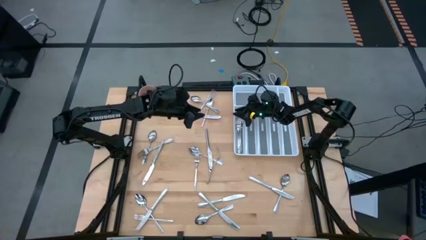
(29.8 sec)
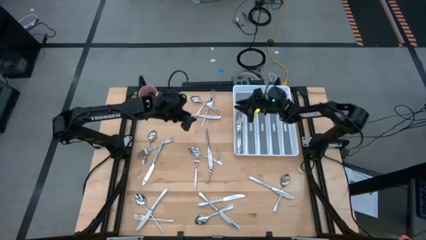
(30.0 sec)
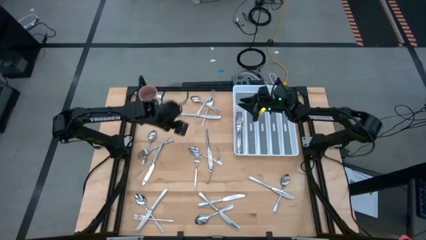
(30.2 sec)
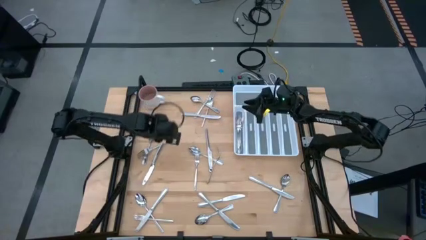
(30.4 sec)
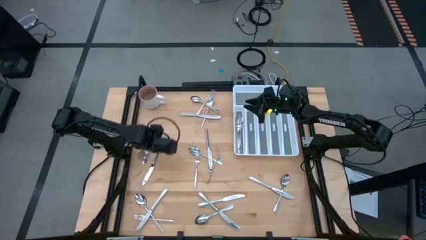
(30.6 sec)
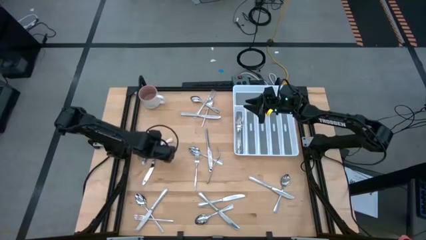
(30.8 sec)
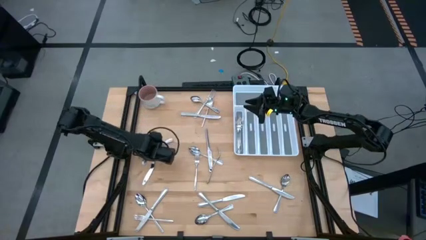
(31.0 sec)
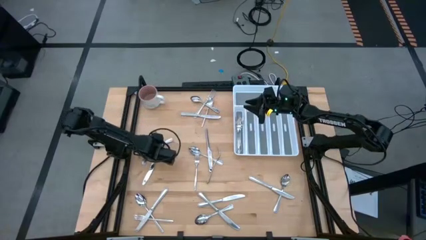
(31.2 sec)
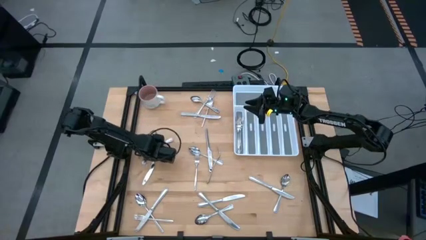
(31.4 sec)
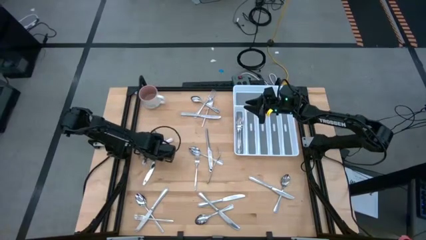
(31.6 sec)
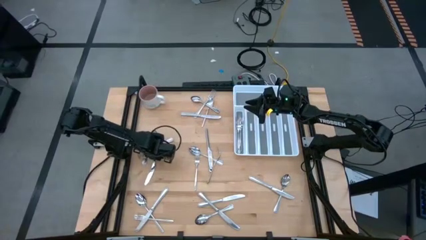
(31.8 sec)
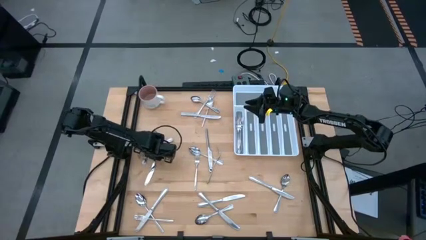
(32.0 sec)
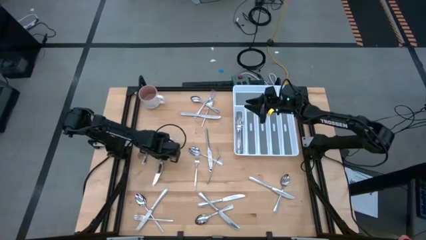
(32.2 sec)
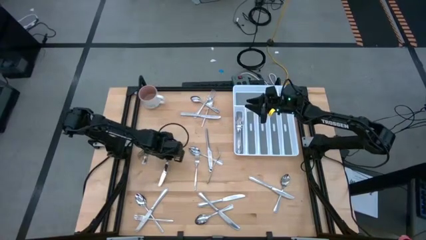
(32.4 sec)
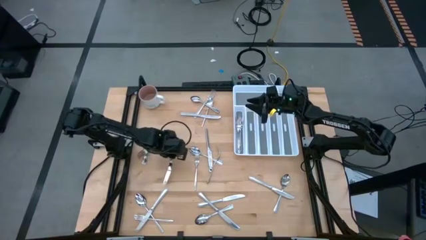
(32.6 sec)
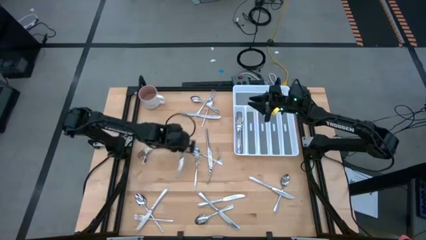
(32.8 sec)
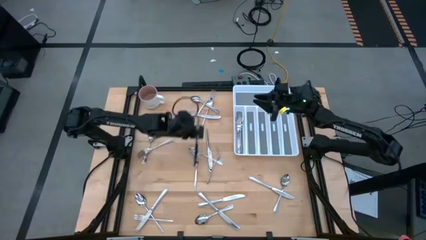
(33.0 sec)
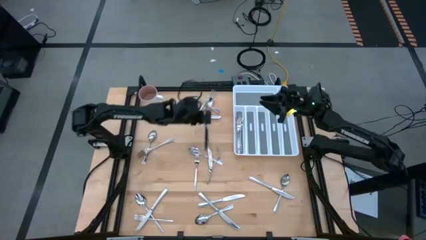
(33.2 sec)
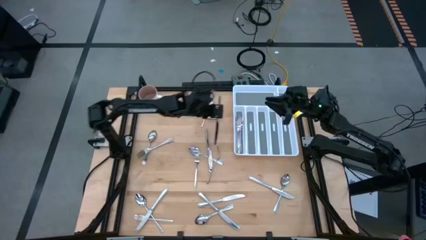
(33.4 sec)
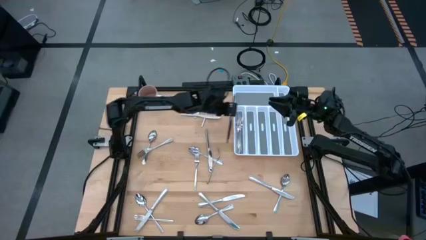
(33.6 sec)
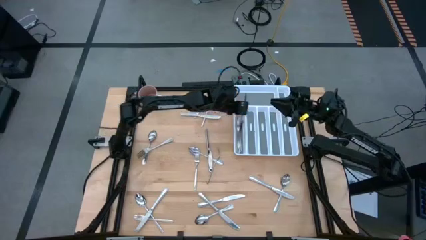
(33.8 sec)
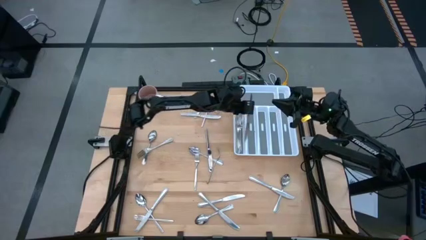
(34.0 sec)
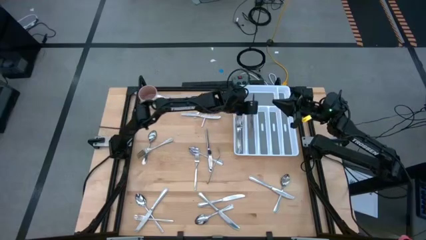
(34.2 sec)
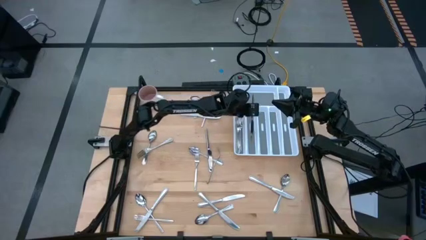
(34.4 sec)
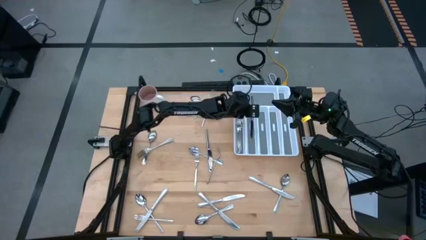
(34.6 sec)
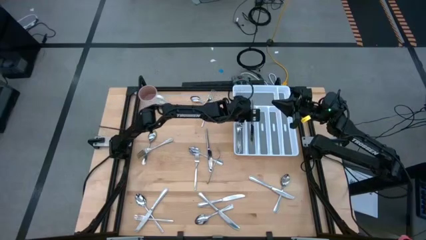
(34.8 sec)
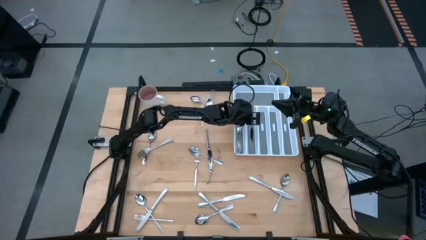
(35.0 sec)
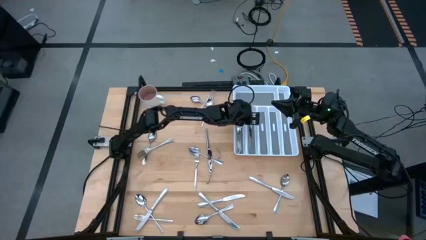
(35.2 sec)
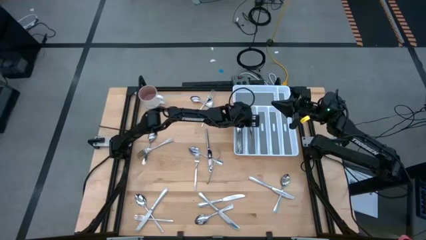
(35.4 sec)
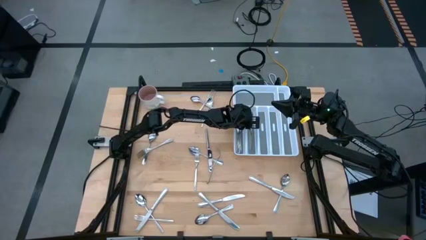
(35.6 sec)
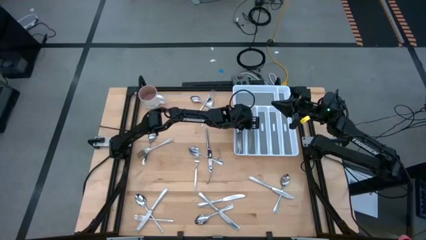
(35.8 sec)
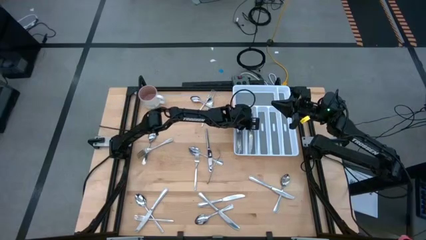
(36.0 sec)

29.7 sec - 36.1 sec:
Task: Sort silverware
Put the silver knife into the middle left slot of the white silverware tray

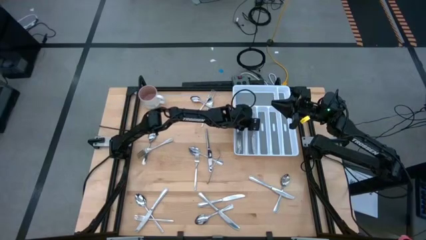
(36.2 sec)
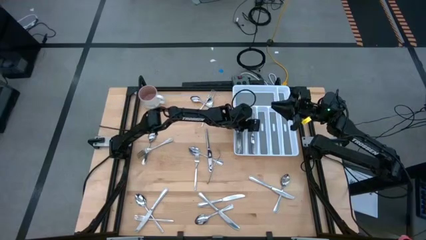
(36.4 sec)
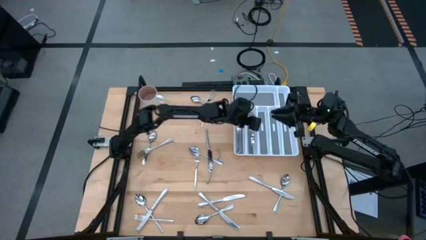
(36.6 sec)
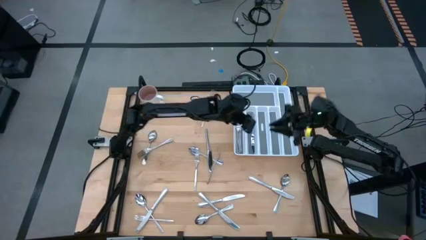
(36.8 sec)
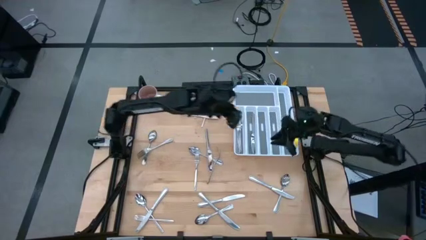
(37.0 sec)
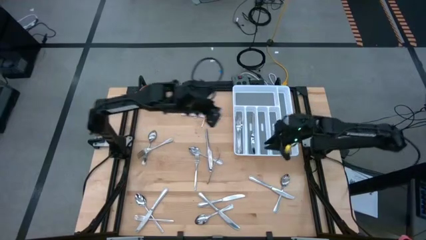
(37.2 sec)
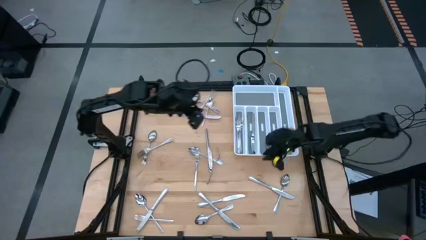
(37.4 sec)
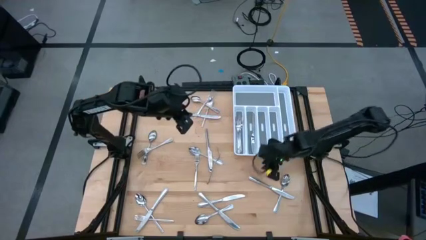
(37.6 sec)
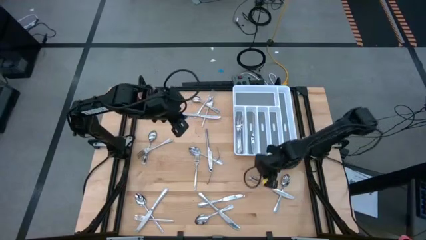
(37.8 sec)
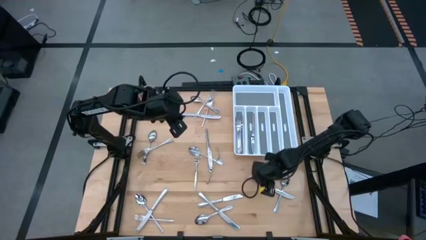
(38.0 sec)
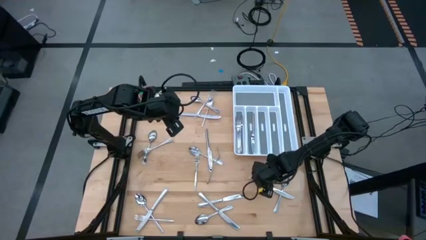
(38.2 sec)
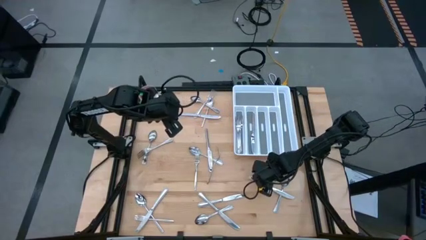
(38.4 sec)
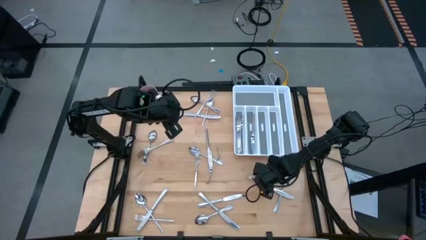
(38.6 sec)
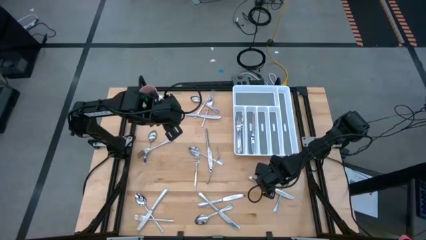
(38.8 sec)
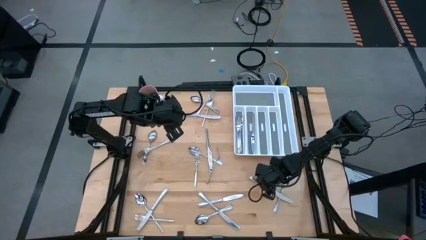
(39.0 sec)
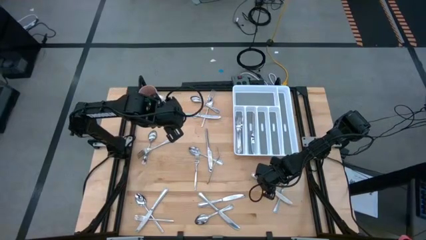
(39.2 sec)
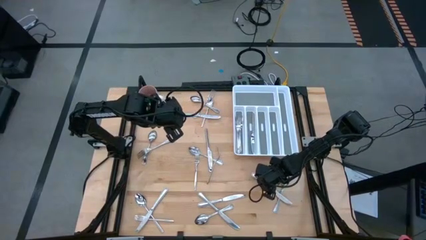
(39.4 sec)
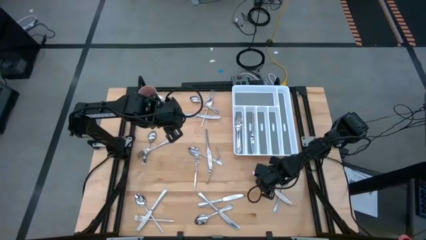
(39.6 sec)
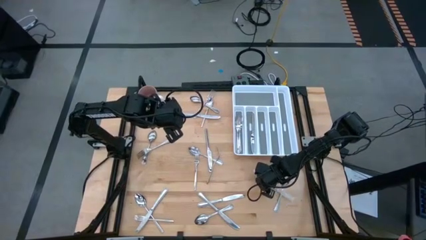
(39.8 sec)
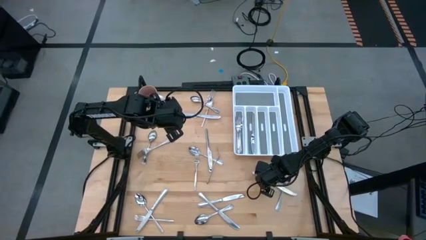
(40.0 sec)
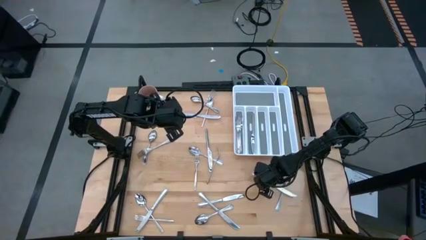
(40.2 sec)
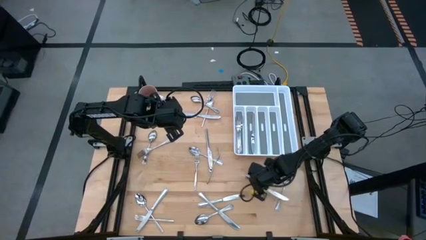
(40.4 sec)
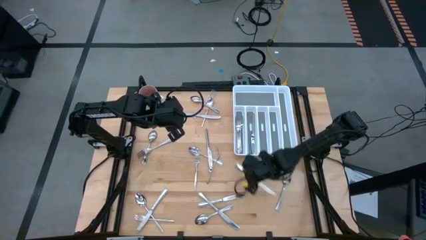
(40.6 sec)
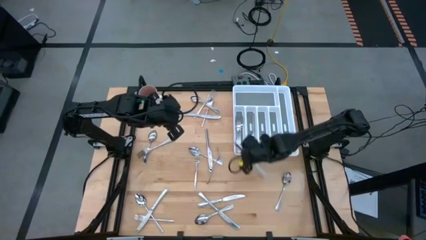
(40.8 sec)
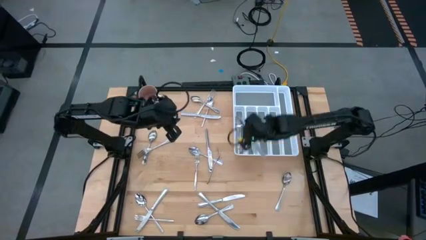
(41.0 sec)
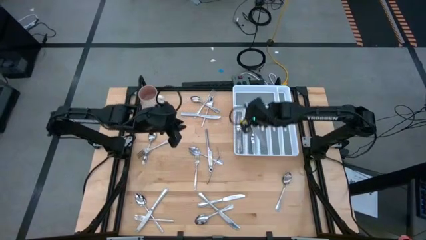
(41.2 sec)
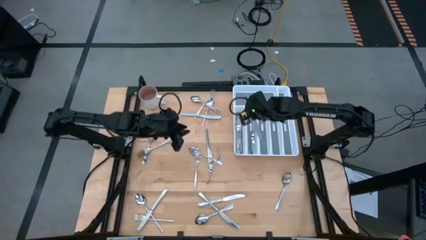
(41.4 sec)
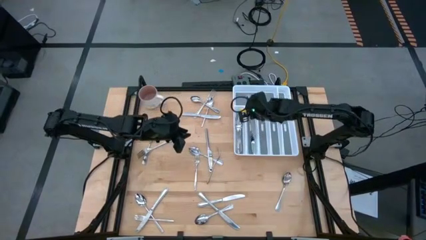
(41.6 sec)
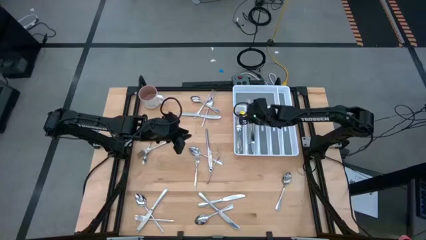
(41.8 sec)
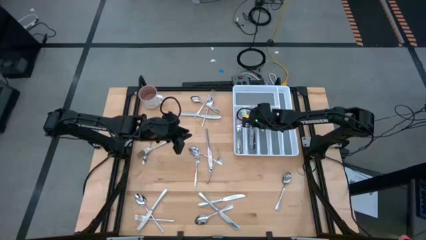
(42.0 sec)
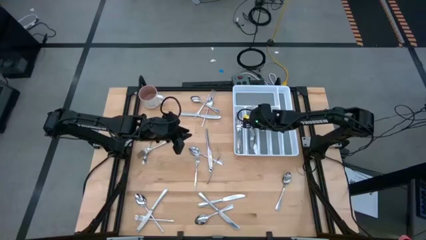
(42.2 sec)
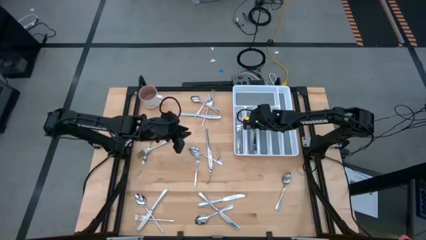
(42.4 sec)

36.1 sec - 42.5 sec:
Put the silver knife into the middle left slot of the white silverware tray

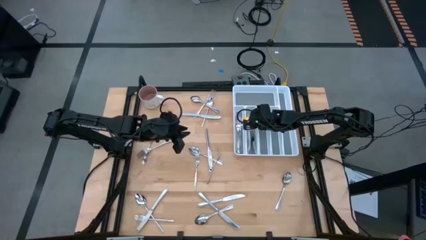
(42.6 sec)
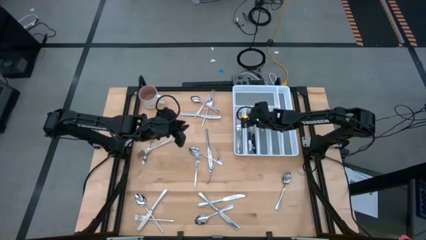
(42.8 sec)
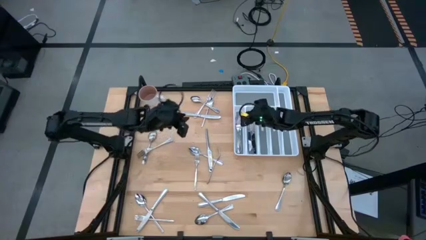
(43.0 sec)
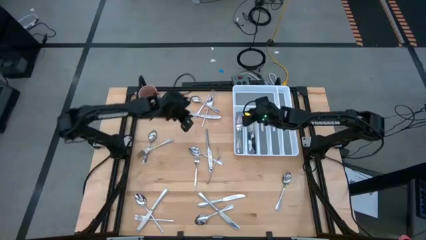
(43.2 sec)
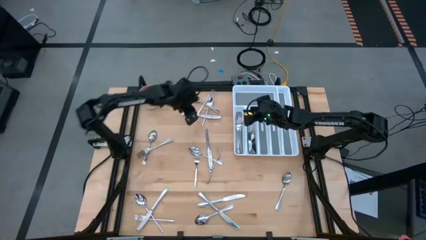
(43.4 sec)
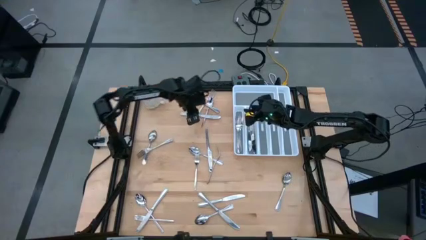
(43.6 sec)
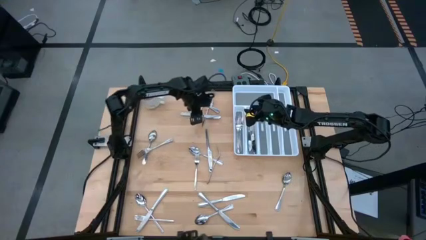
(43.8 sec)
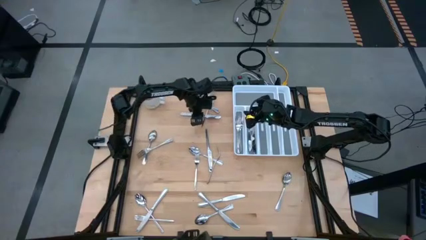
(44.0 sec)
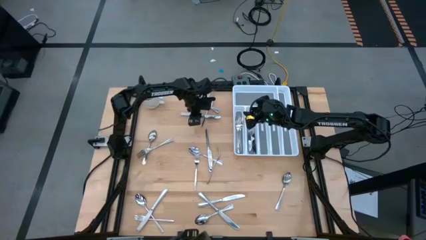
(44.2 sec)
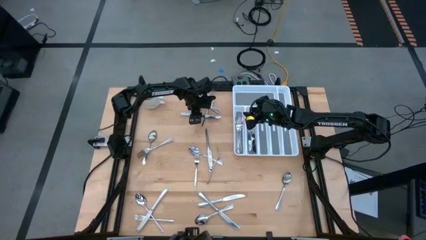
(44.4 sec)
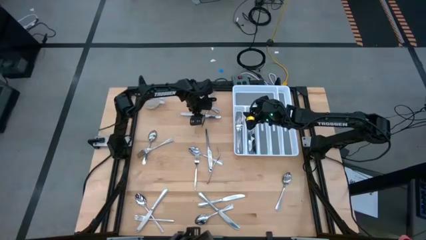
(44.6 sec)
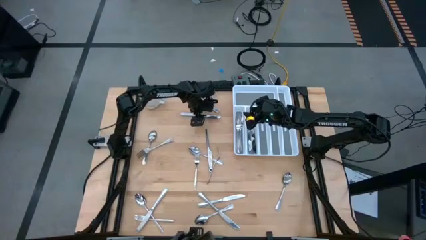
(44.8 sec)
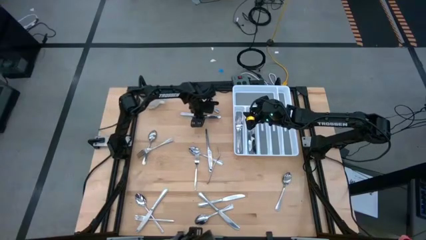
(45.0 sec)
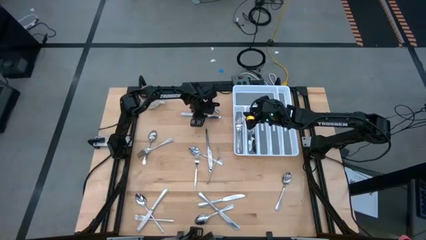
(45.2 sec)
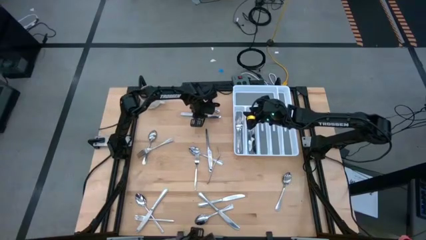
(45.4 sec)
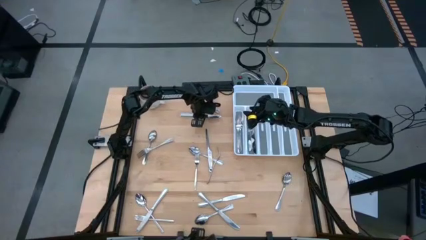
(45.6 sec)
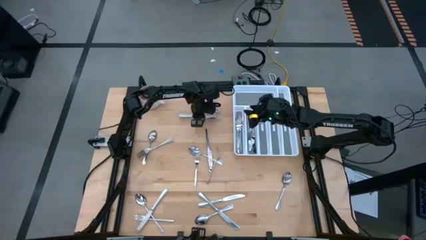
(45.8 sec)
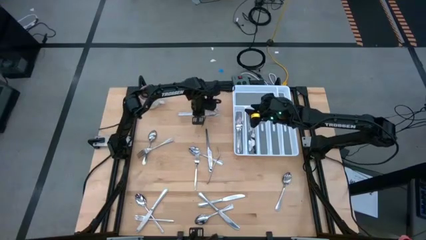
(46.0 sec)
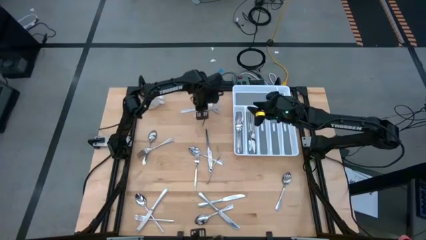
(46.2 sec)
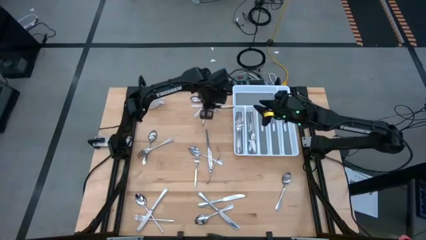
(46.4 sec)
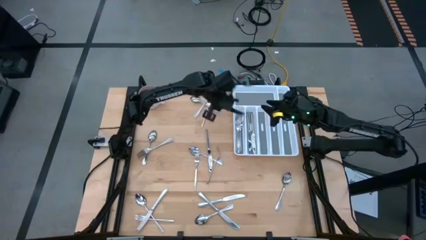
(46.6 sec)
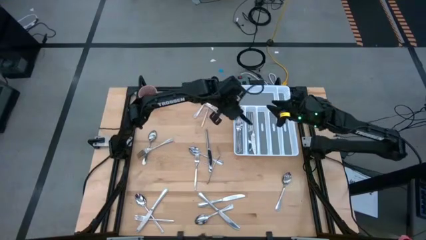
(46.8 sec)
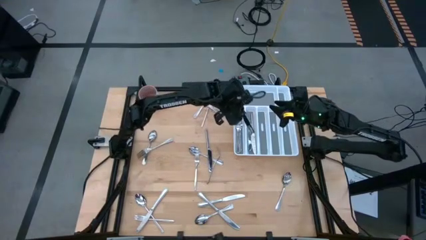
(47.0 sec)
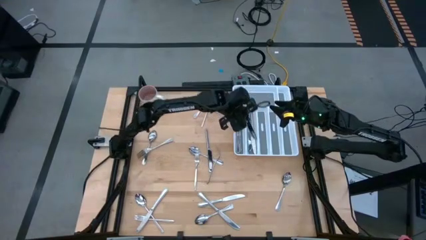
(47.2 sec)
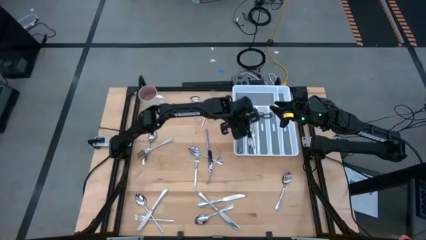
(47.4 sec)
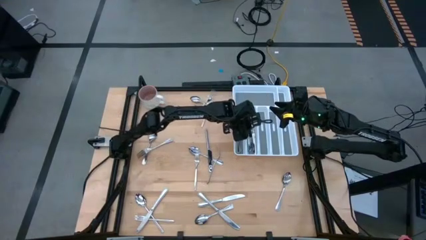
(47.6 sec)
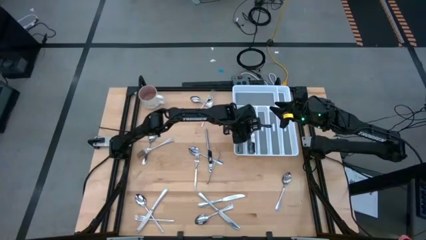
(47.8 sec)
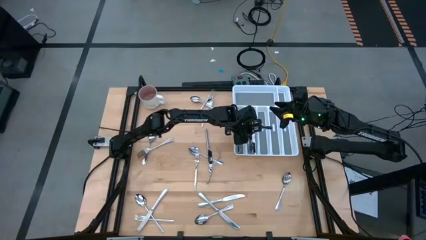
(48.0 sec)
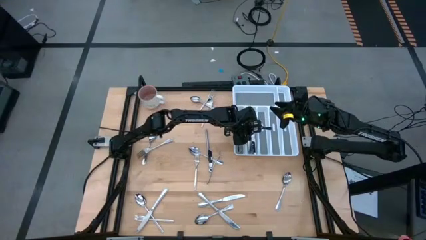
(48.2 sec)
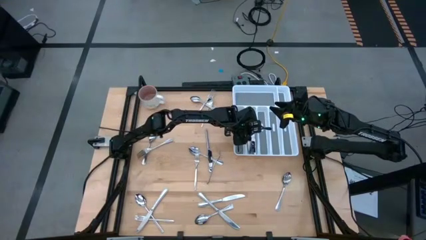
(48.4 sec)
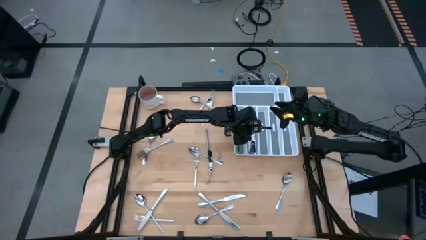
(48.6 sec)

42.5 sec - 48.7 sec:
Put the silver knife into the middle left slot of the white silverware tray
